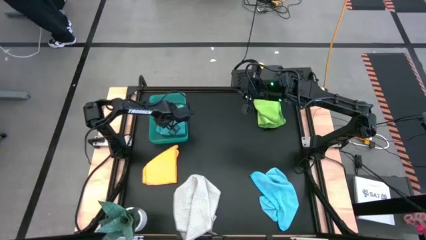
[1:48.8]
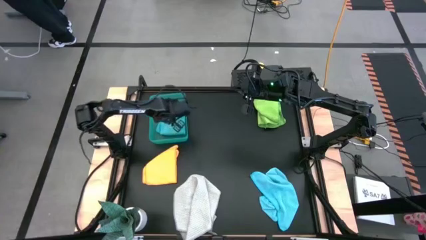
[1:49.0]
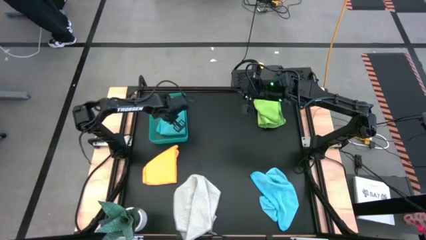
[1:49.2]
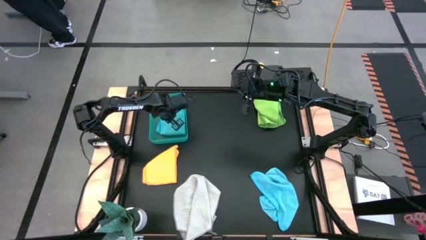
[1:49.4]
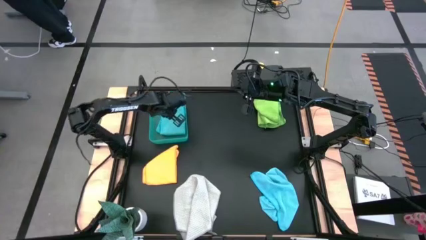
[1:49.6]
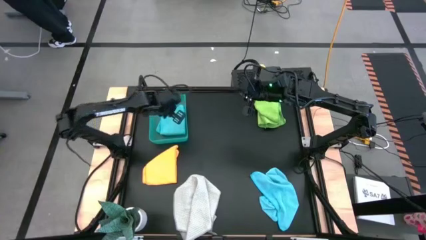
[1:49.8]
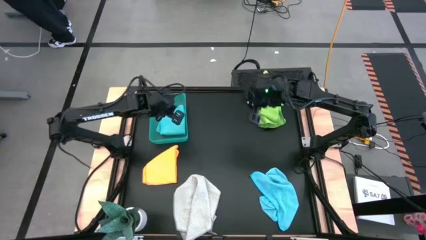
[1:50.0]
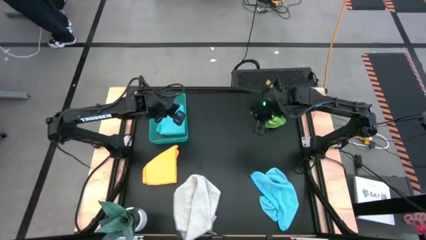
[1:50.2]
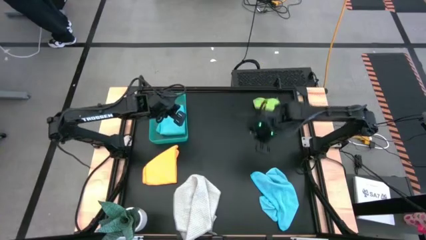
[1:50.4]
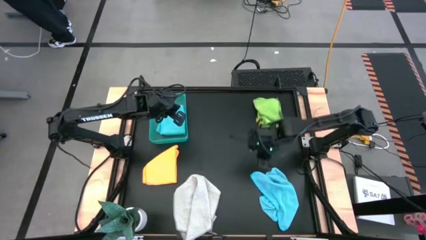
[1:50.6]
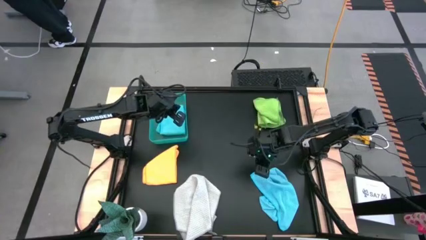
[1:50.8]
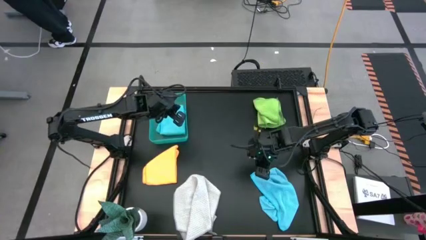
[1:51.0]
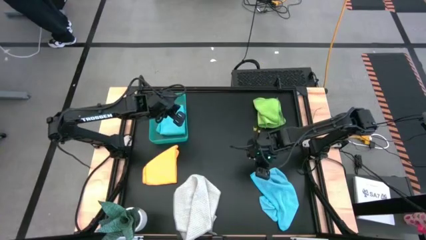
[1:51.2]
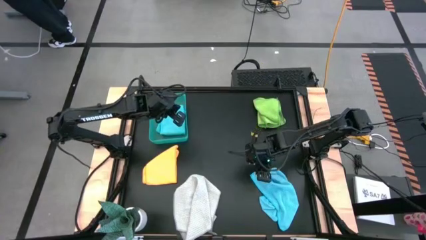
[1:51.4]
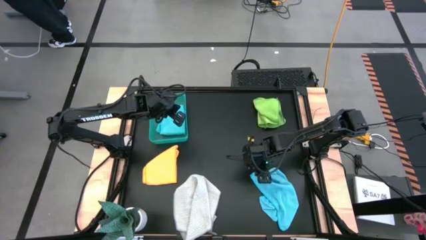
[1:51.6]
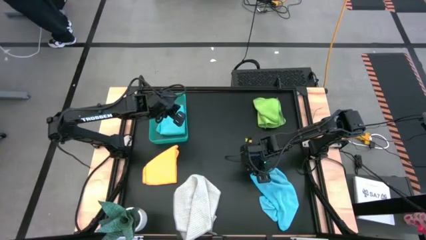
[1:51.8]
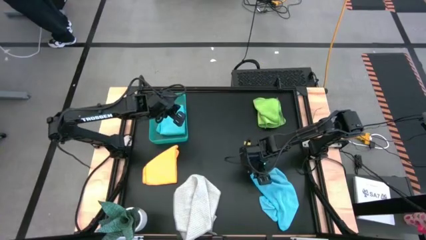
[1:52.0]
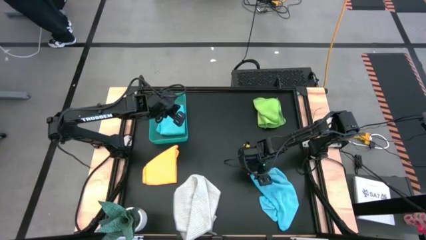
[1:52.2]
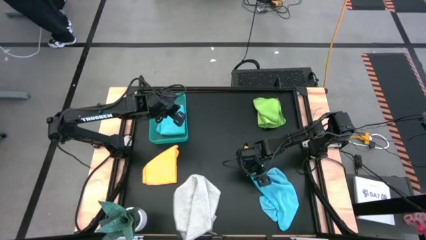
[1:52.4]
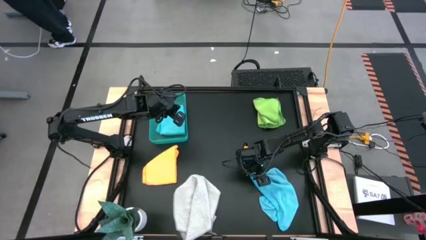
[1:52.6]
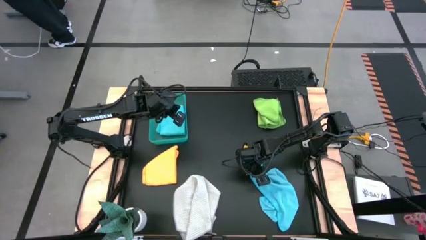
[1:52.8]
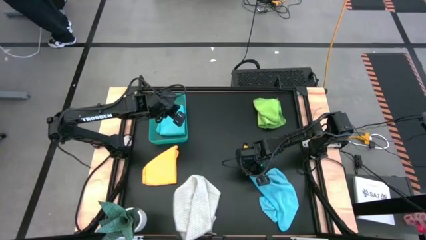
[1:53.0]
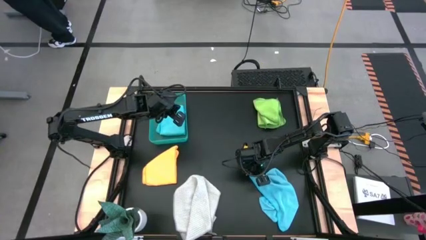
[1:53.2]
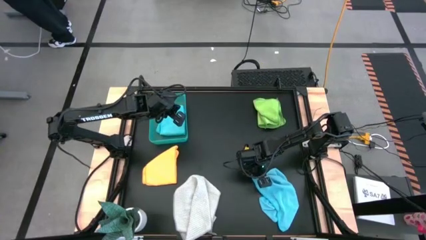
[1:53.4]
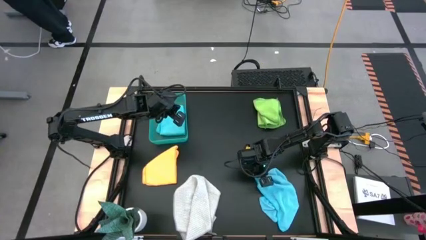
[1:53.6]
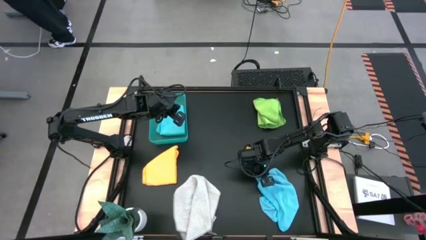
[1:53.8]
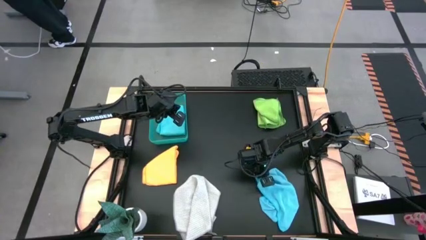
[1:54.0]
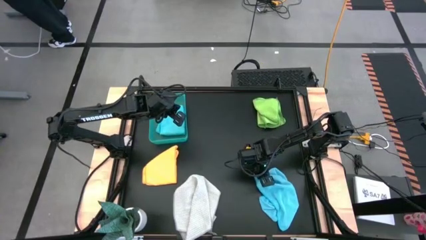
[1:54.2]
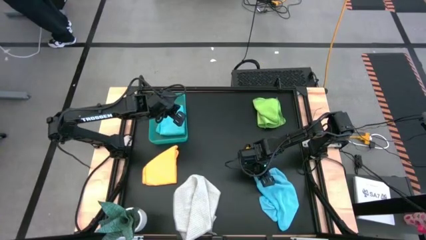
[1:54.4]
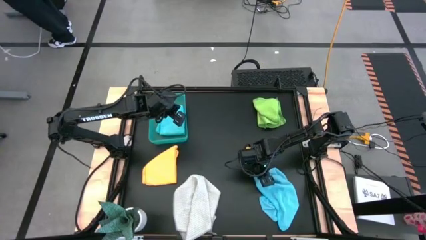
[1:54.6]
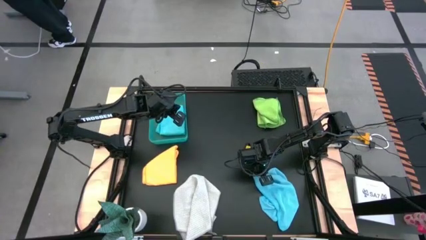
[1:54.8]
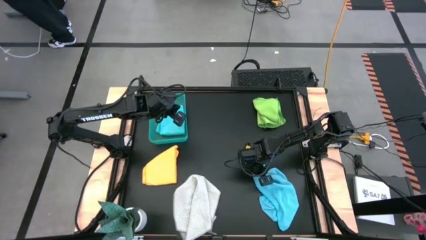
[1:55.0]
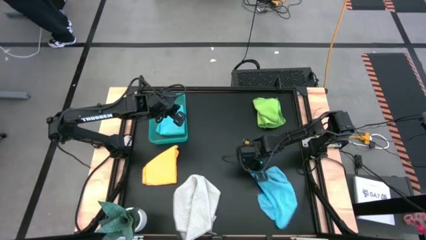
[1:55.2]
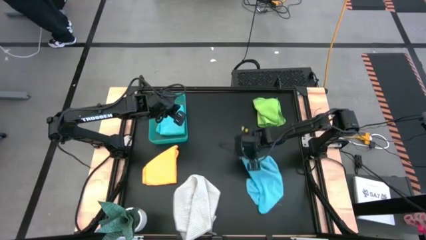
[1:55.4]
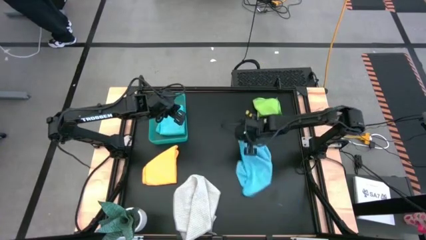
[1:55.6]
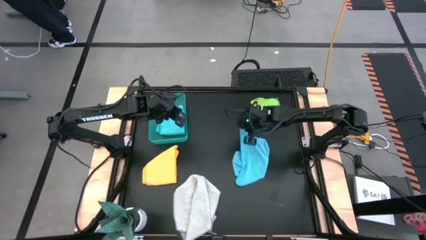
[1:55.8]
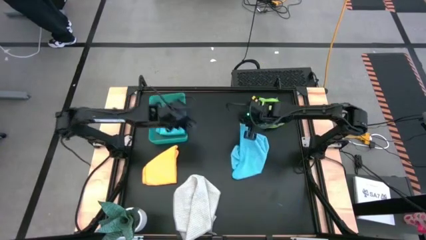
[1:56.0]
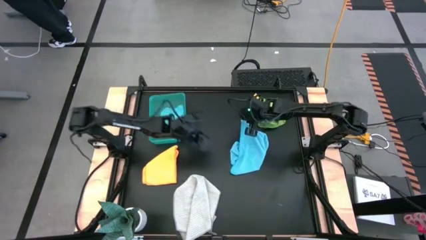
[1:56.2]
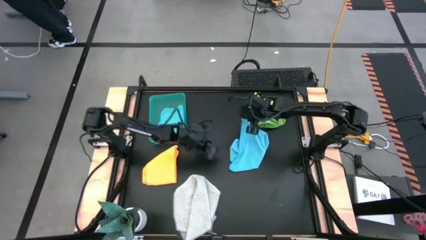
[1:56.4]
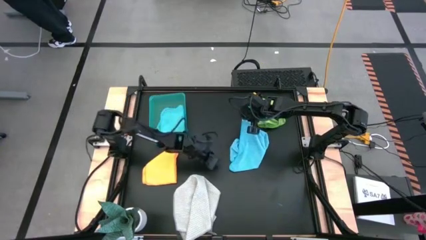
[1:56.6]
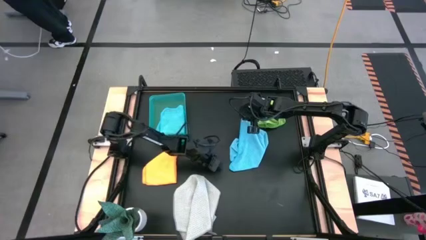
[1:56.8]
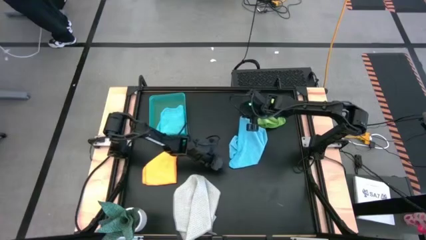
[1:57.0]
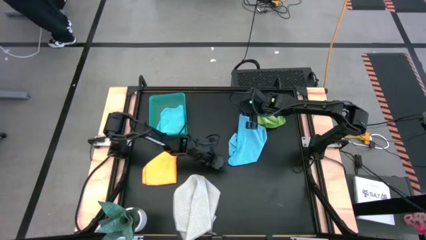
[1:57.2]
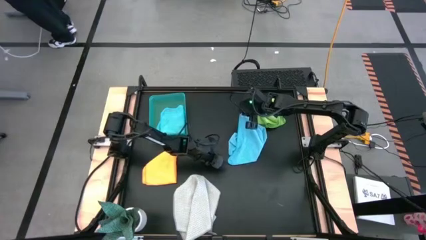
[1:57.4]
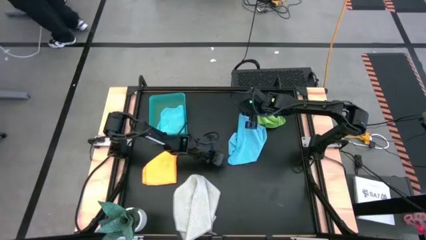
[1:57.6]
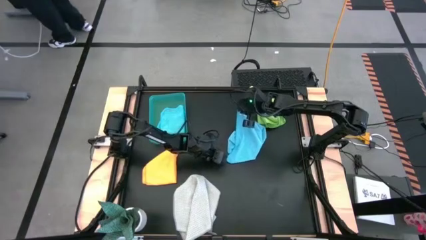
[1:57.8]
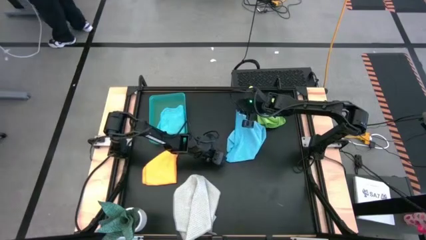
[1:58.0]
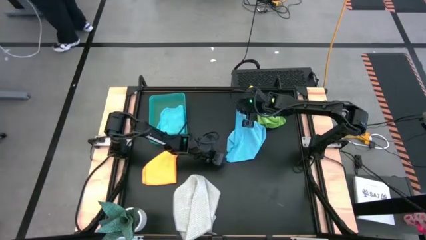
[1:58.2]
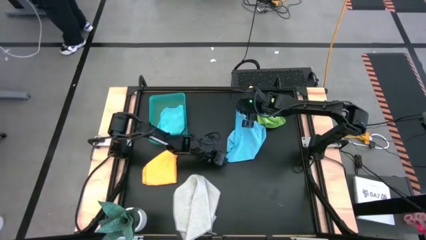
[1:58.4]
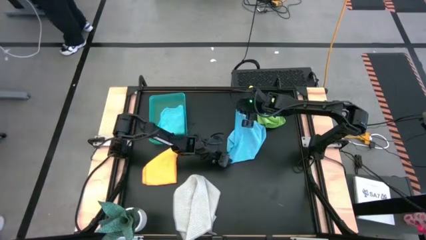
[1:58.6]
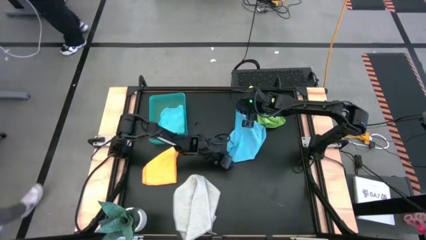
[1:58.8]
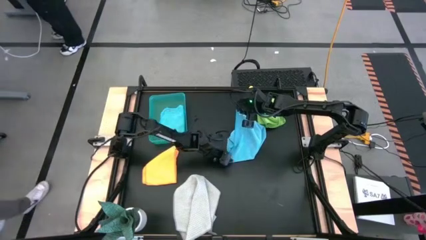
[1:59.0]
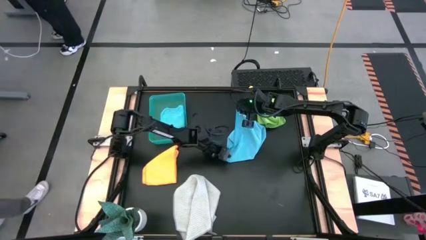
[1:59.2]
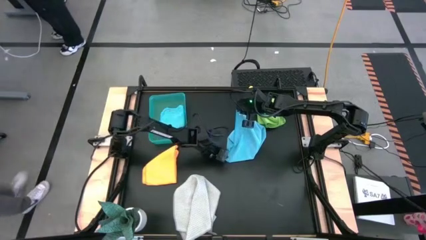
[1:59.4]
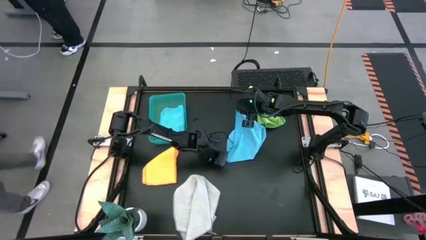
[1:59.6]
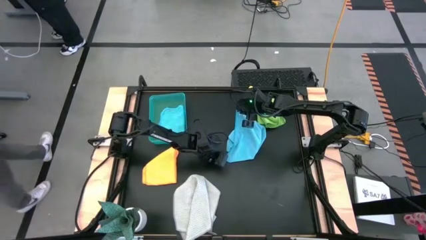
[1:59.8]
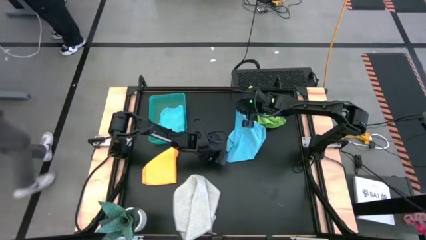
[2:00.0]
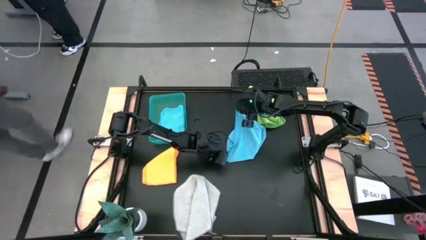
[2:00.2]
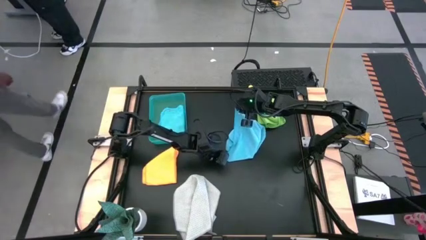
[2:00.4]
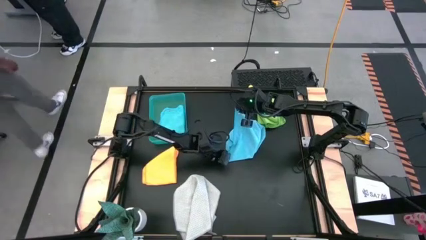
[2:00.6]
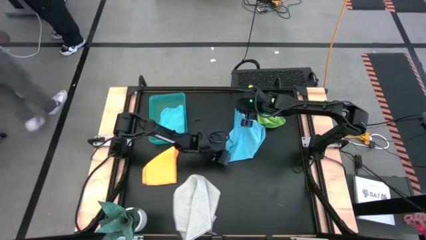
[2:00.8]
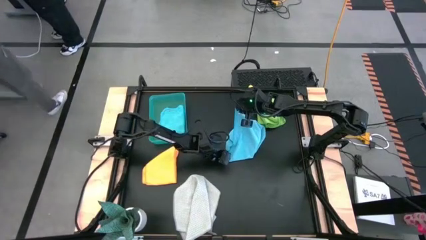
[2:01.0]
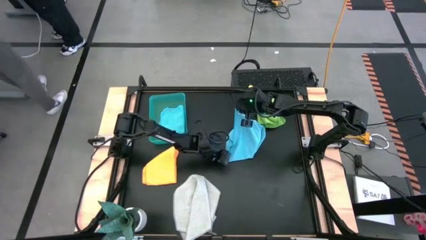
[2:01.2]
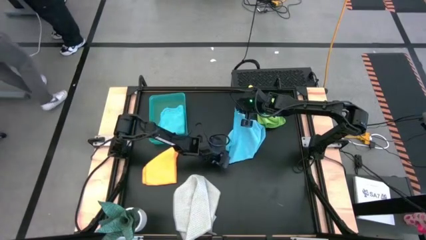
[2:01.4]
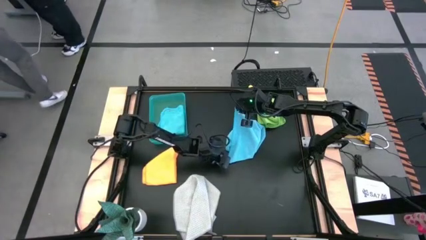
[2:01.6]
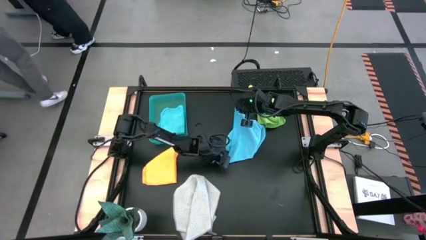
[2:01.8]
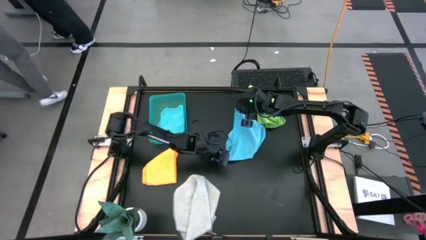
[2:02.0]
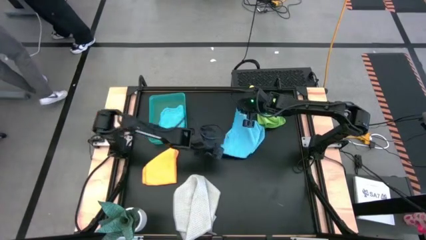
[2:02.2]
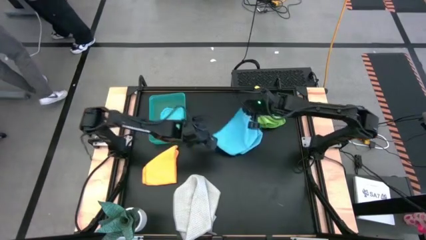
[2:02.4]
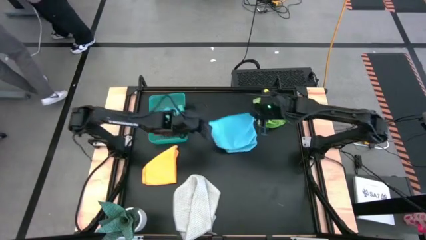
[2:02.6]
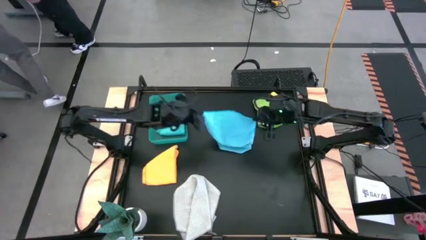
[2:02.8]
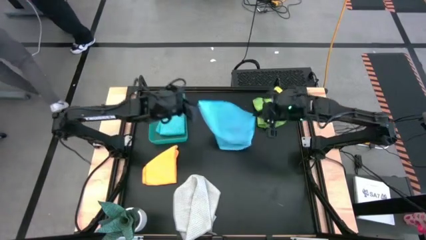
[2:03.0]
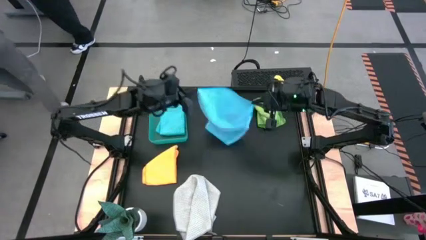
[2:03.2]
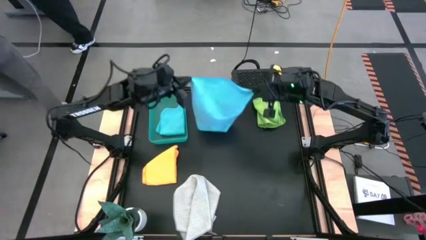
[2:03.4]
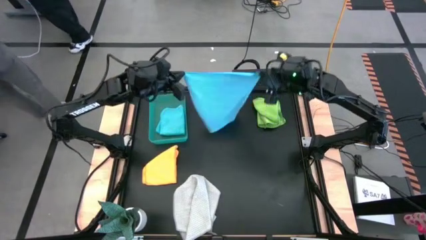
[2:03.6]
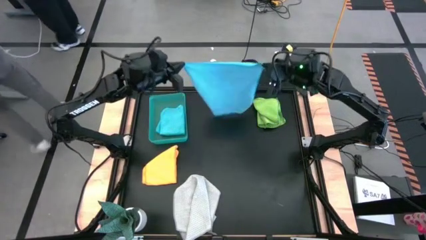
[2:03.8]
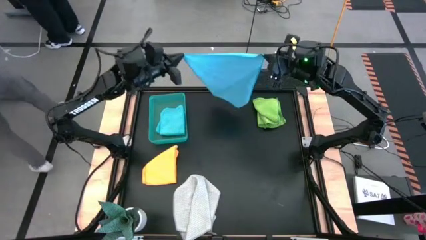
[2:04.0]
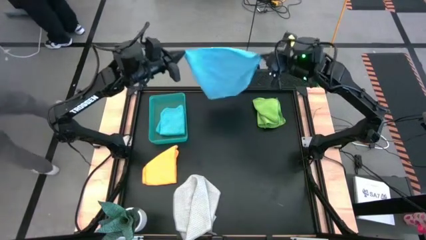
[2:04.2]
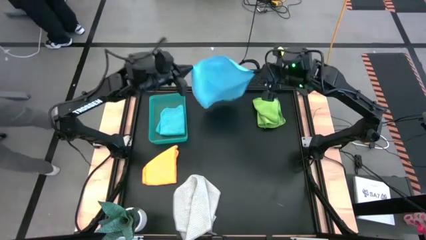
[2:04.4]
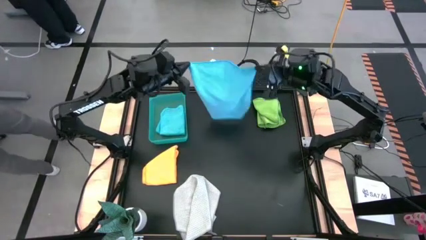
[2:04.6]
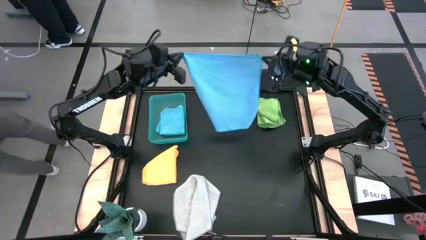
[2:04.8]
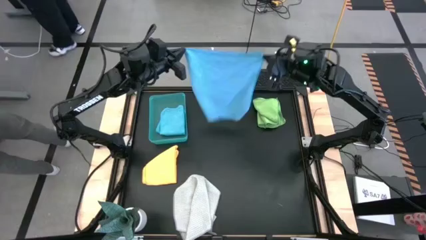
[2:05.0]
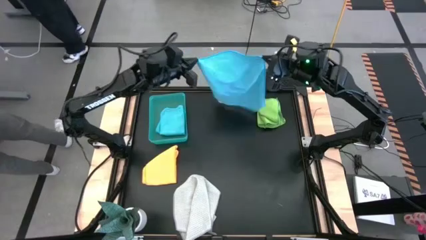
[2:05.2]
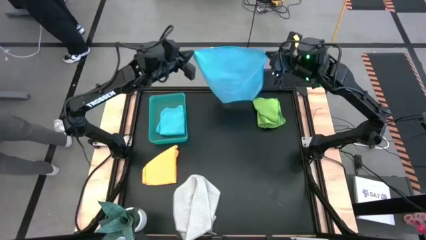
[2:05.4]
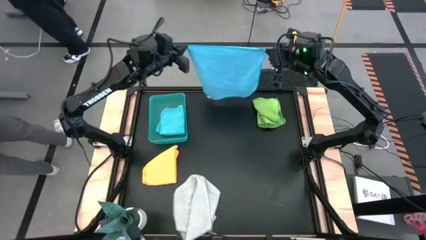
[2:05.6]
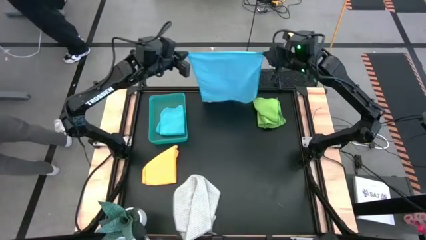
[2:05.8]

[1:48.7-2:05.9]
Task: Fold microfiber towels
Fold the blue microfiber towel
